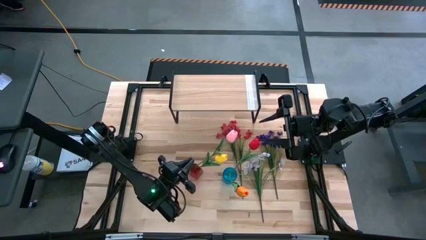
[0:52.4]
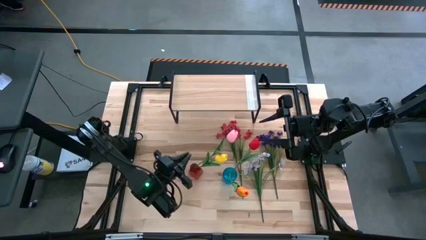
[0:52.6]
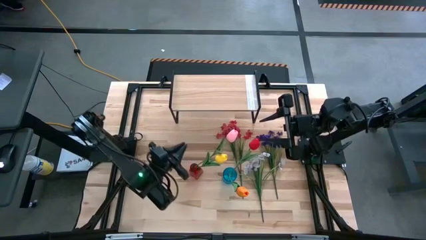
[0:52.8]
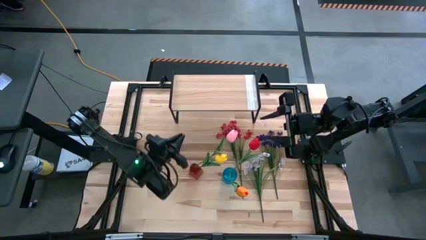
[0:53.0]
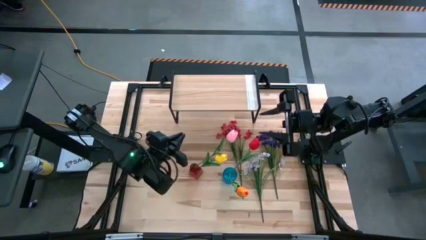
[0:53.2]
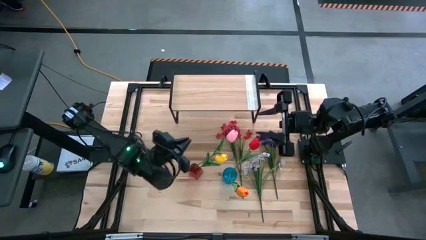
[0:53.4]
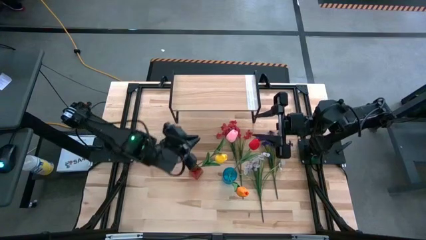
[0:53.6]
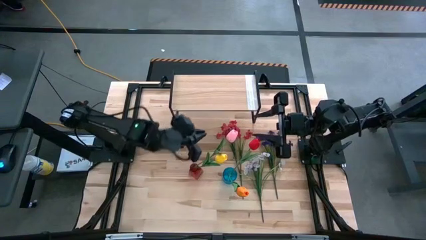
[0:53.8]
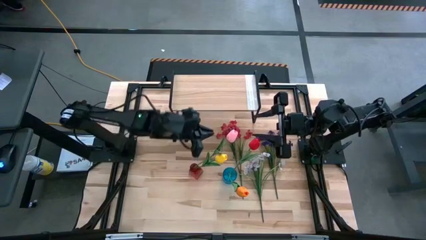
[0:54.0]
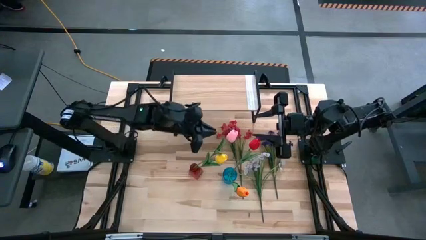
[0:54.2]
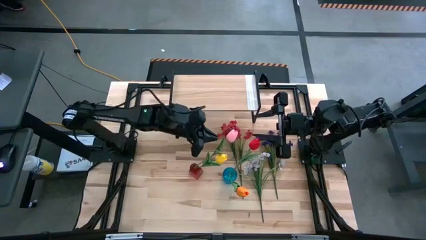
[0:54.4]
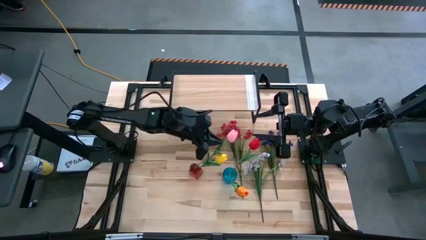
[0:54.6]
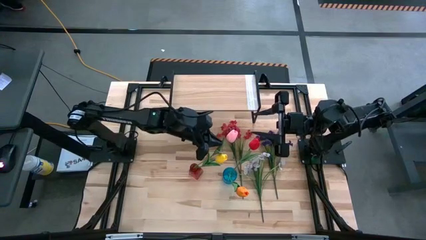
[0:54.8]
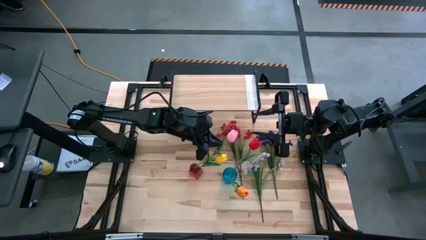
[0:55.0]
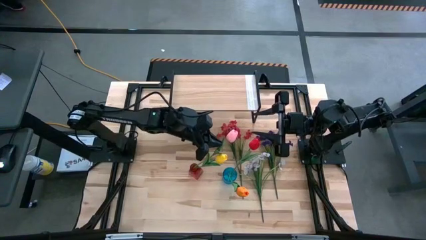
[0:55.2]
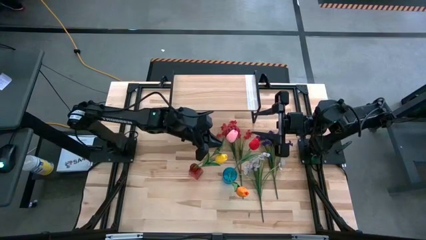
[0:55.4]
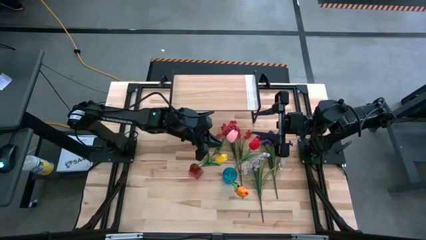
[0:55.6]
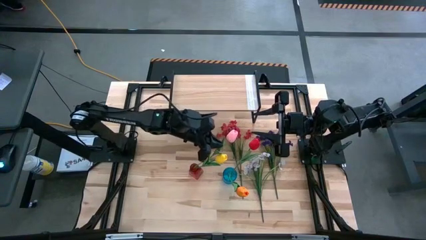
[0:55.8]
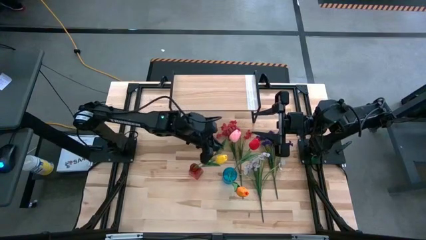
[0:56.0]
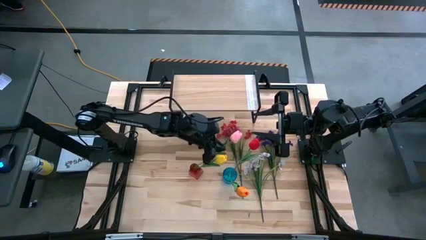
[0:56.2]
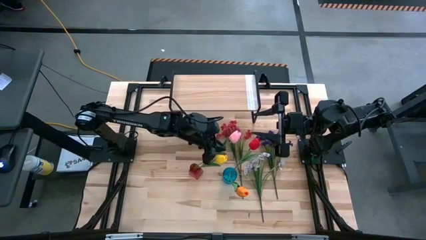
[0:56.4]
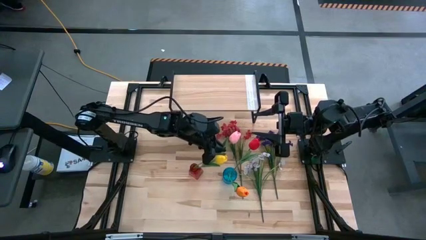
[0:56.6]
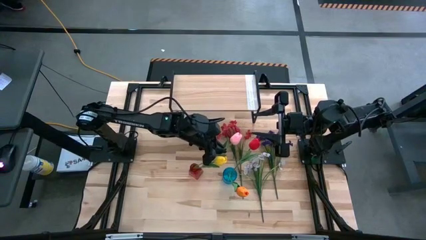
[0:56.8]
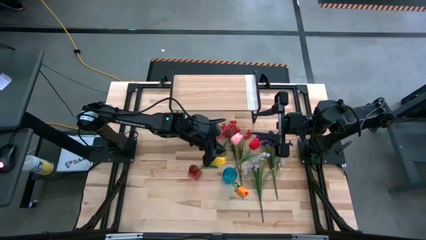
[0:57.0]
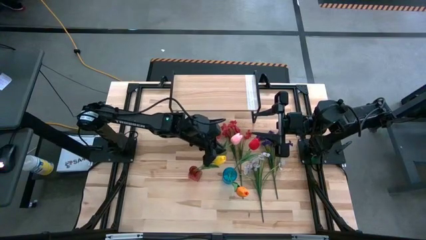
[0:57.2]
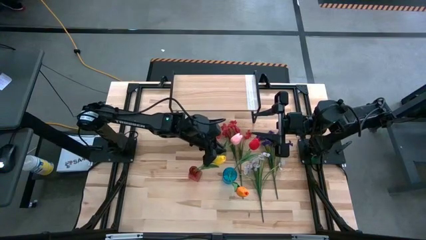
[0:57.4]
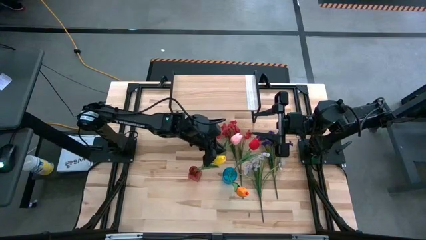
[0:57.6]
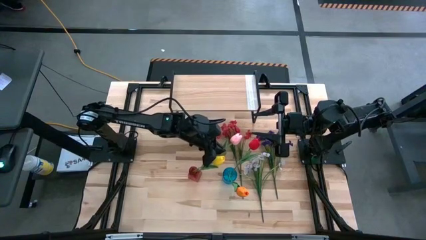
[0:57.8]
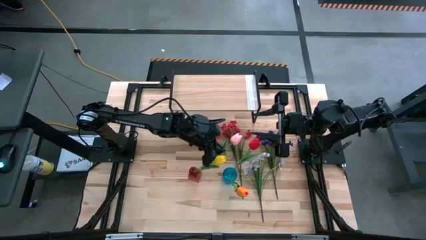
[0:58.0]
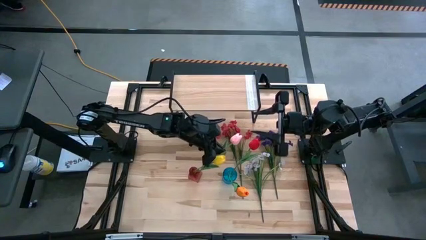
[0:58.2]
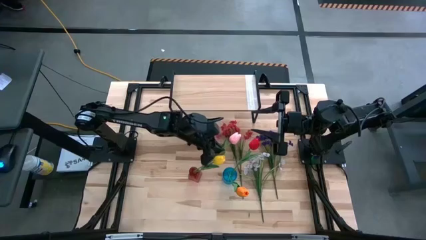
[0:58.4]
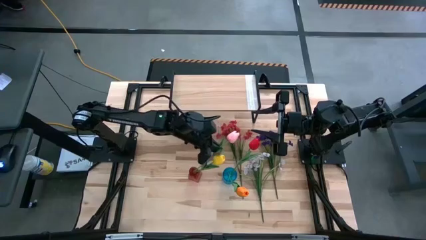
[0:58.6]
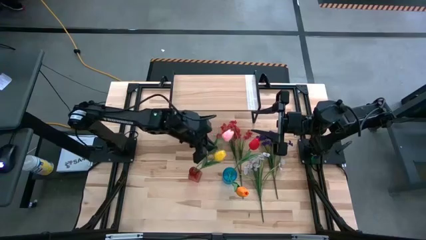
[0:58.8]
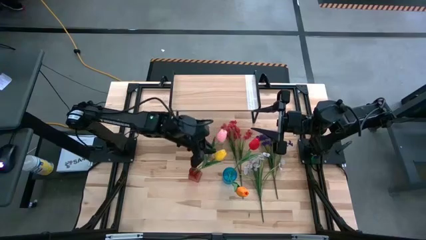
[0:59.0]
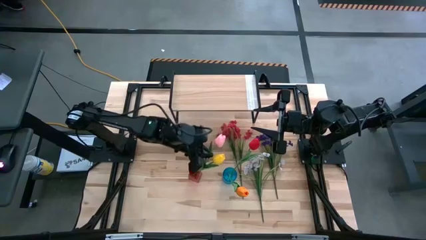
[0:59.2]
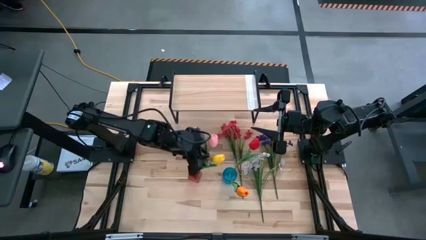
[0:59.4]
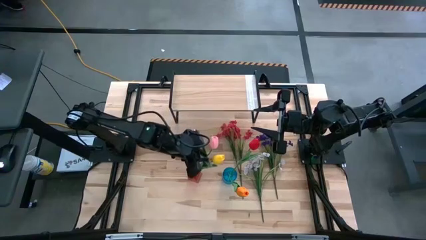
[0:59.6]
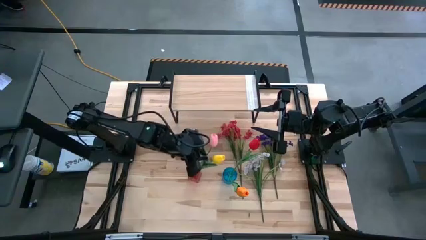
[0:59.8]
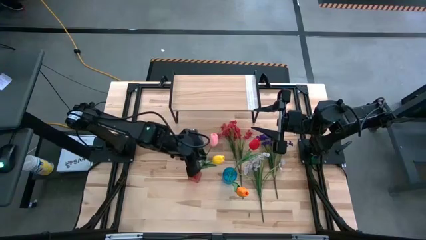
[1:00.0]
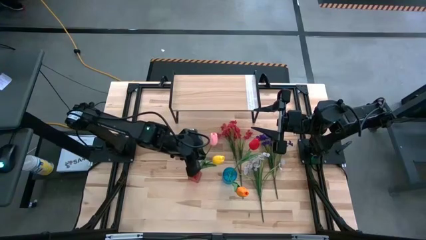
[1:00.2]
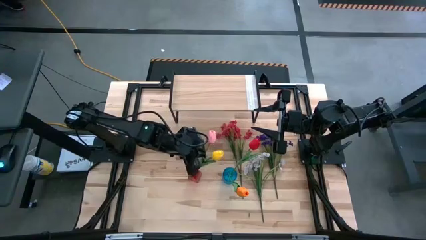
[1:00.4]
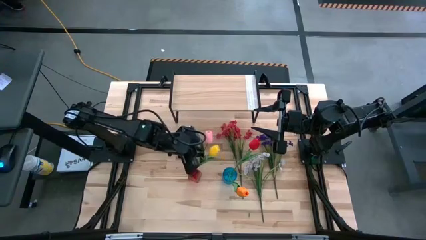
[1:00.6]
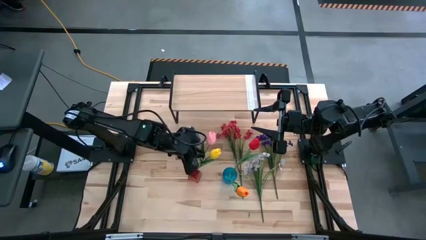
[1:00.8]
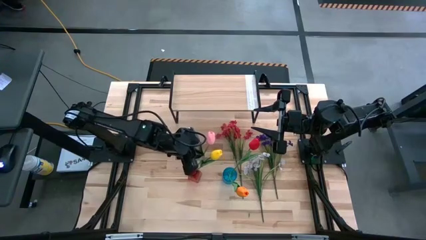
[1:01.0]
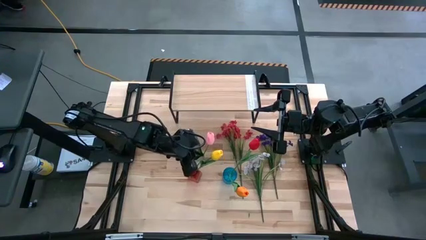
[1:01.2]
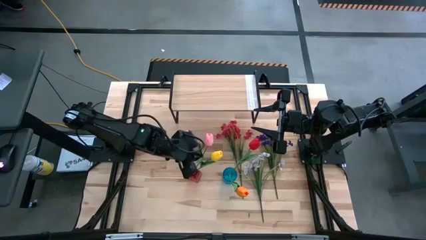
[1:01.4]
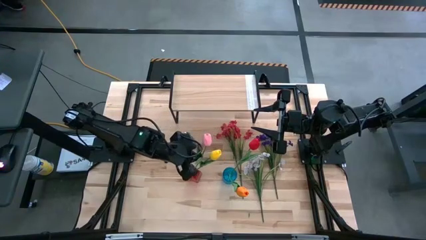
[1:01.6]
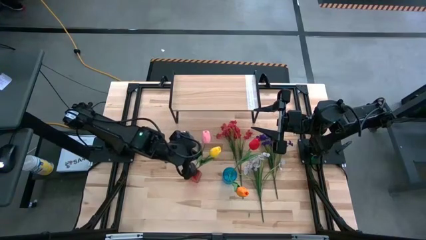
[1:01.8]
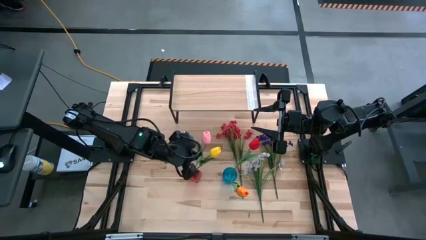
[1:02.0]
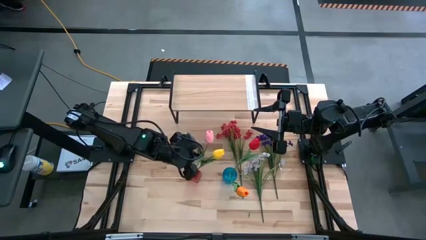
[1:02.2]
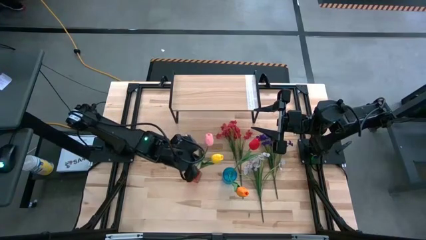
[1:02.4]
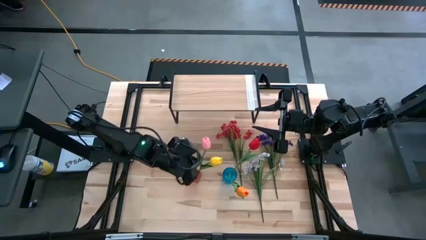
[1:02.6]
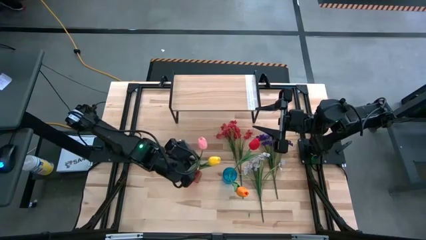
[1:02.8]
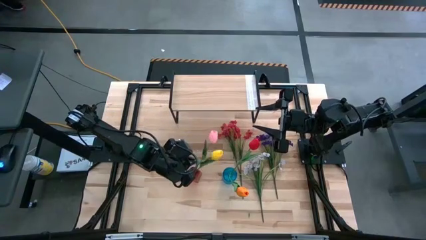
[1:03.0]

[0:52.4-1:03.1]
Task: Pick and place flowers into a vace then onto a shelf
Put the pink flower into the red vase
